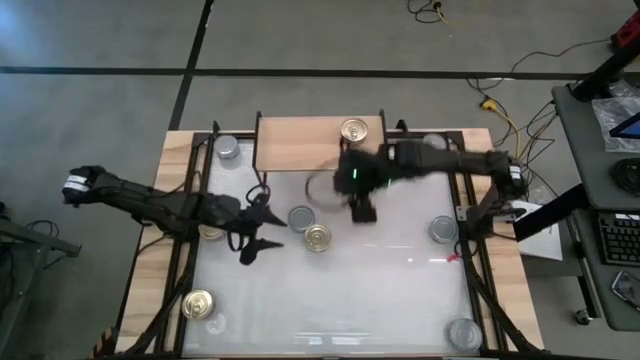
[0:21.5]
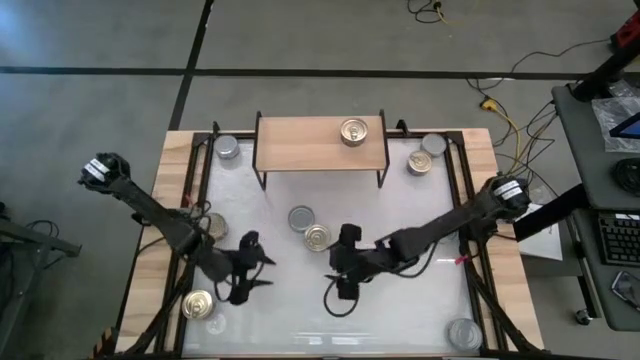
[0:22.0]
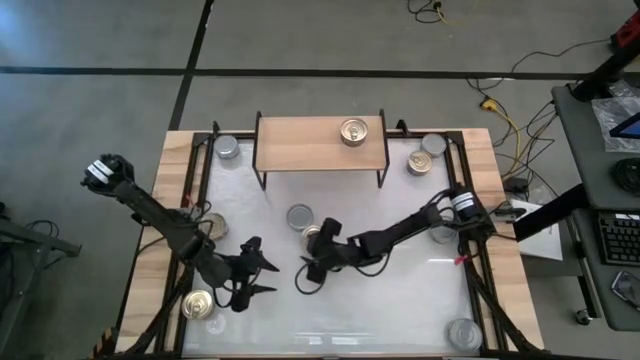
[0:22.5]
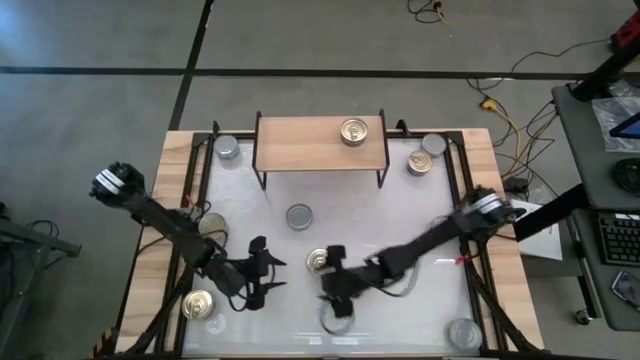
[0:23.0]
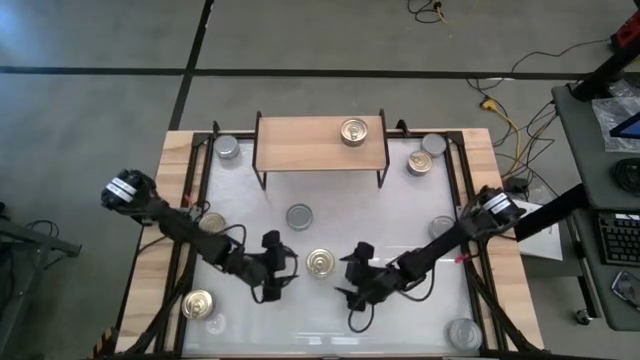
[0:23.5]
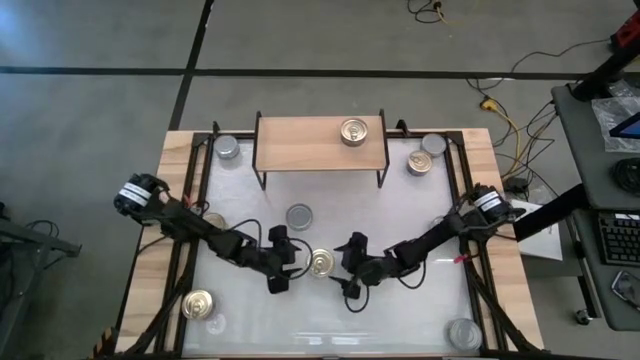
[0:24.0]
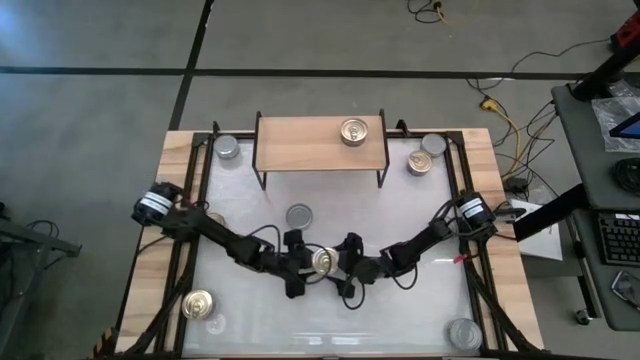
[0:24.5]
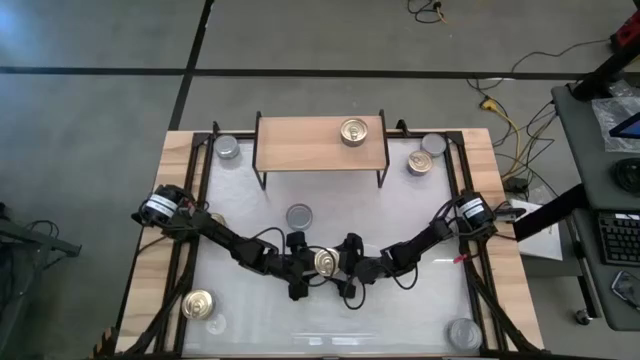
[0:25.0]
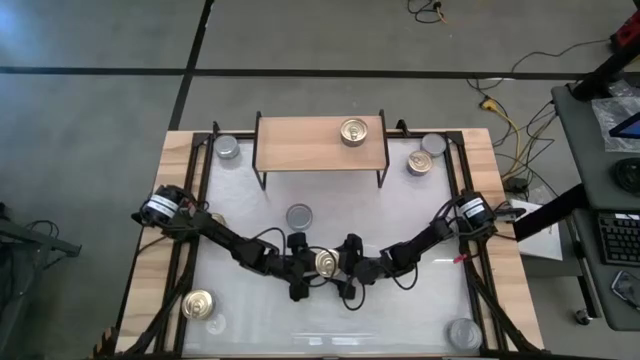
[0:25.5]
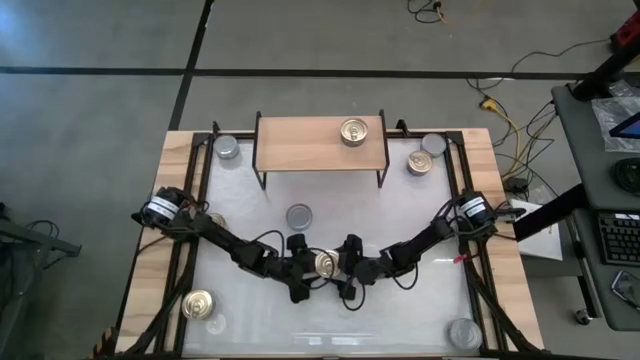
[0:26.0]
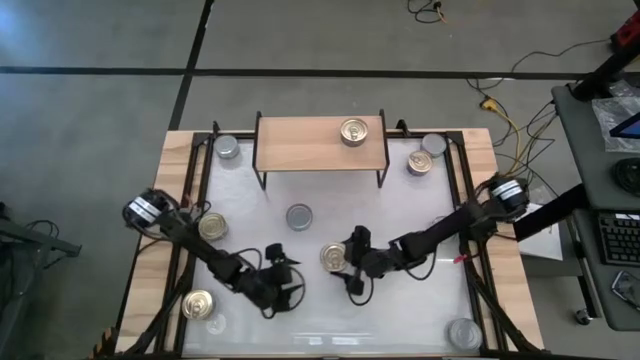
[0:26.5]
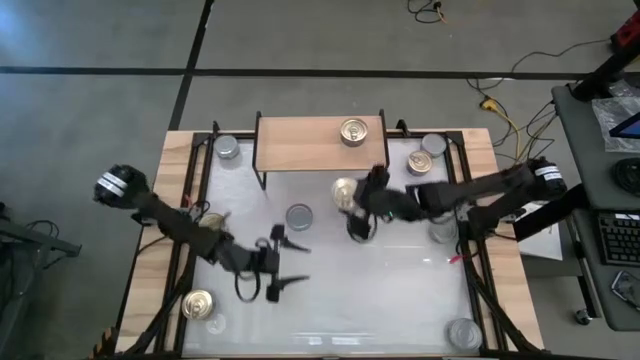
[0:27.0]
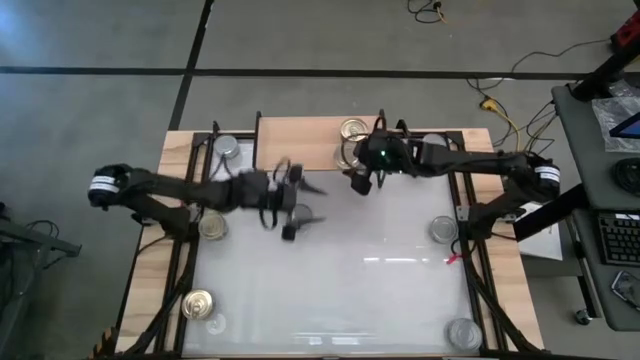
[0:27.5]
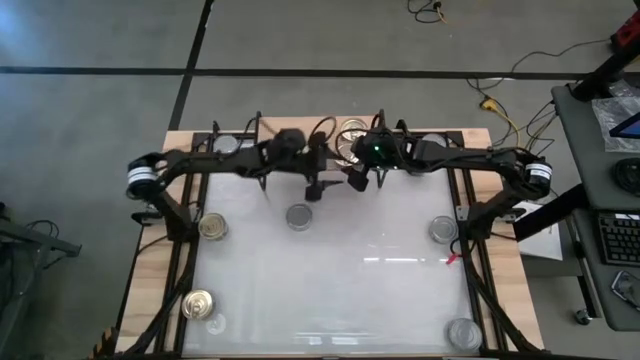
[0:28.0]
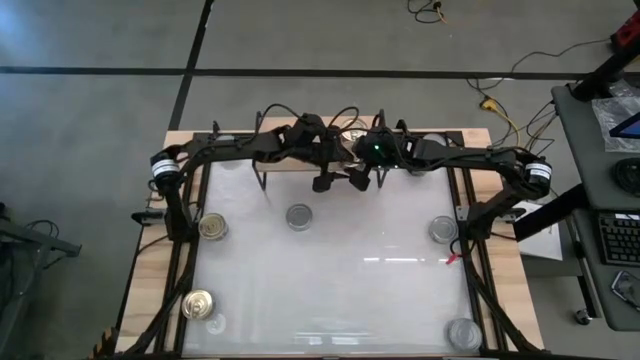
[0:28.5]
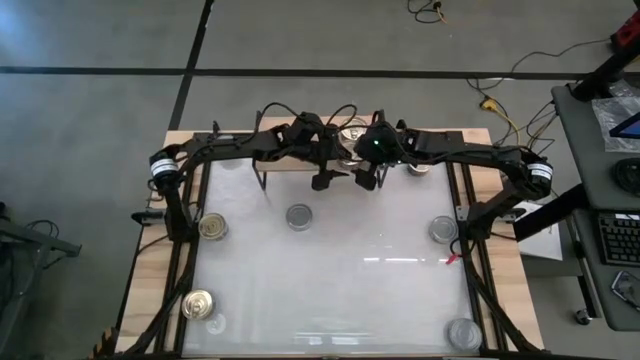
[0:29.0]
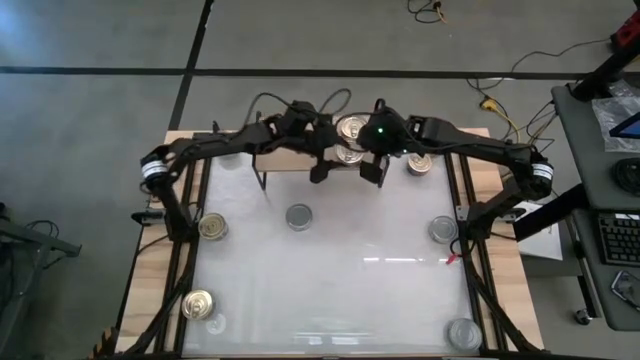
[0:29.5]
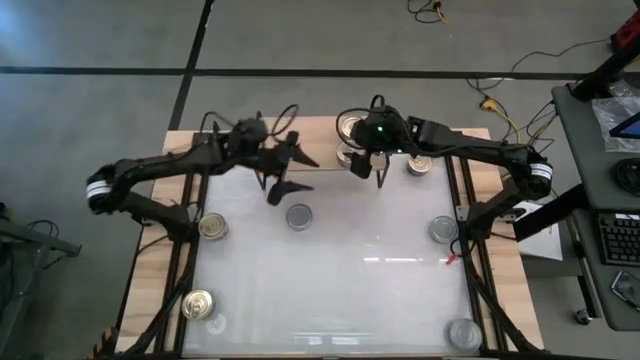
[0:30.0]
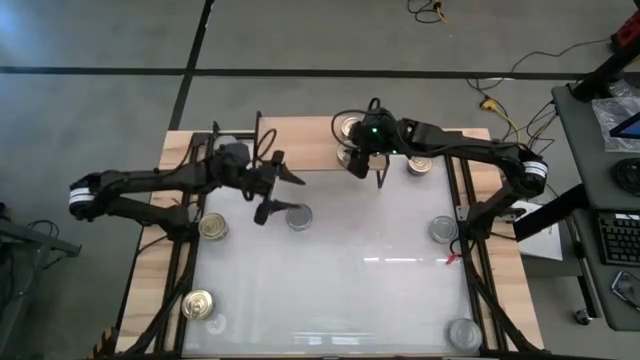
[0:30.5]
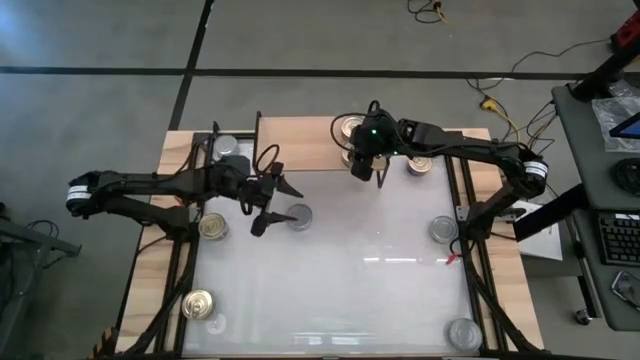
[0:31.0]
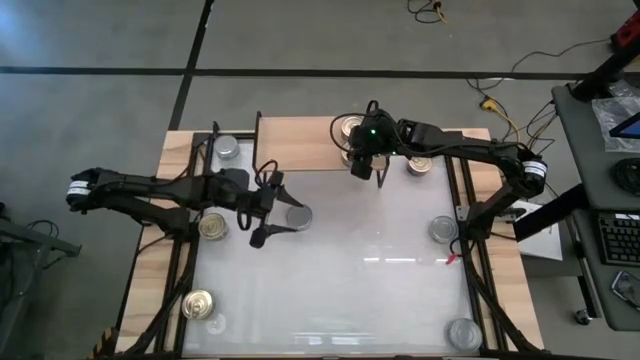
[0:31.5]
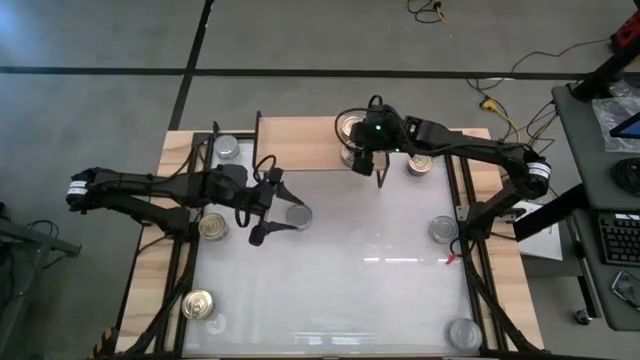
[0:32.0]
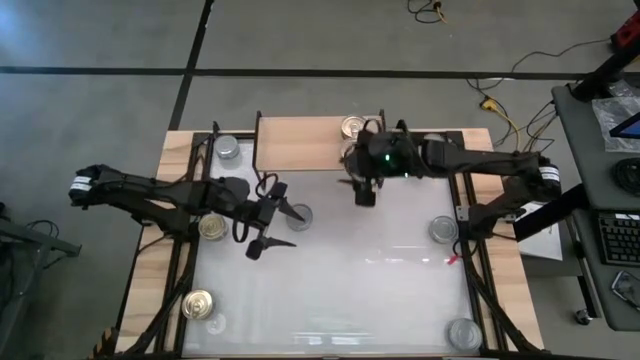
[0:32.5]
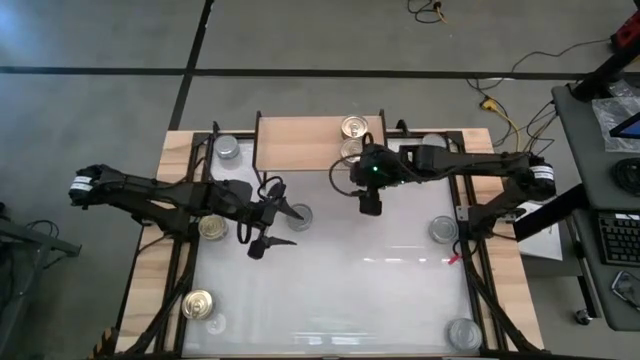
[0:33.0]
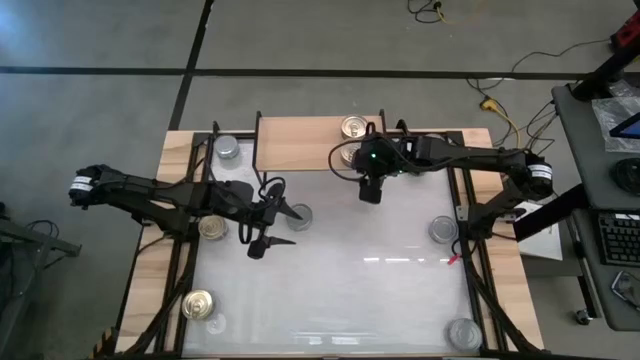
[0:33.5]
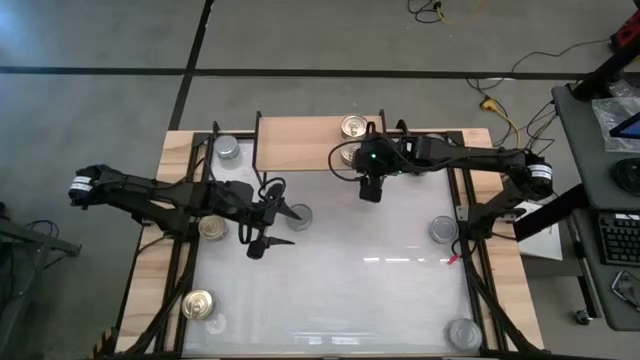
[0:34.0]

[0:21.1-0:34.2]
Task: Stack canned seafood by type on shelf
Put the blue-pink tuna can on the shelf aligned with the other blue-pink tuna can

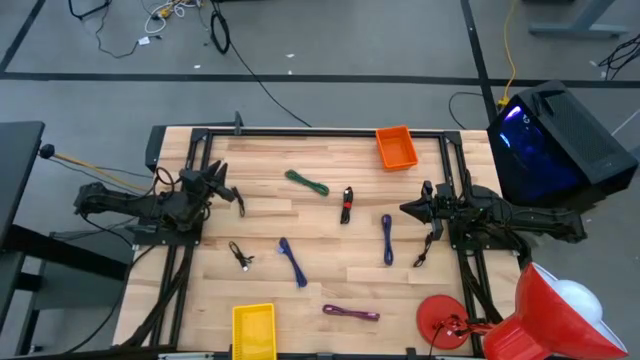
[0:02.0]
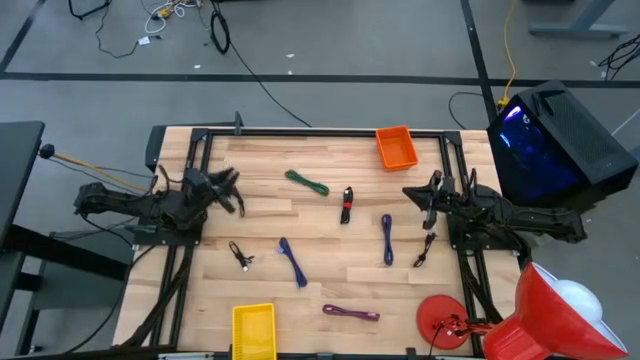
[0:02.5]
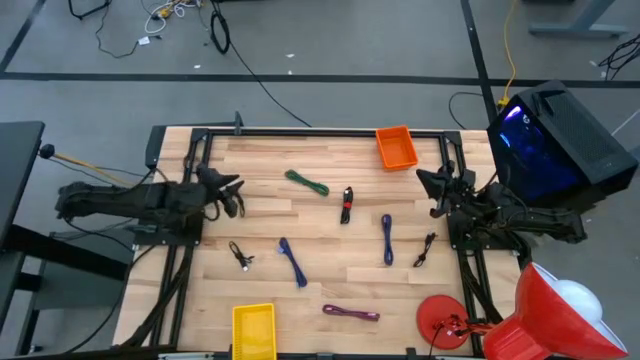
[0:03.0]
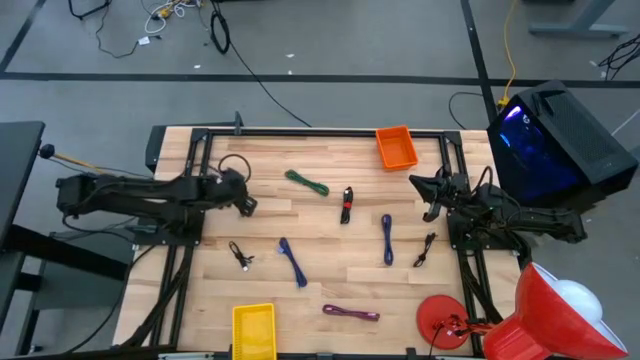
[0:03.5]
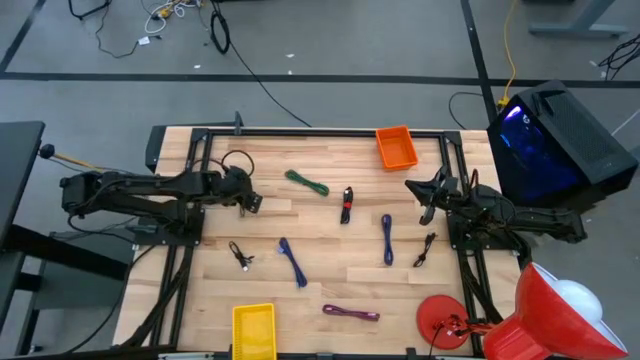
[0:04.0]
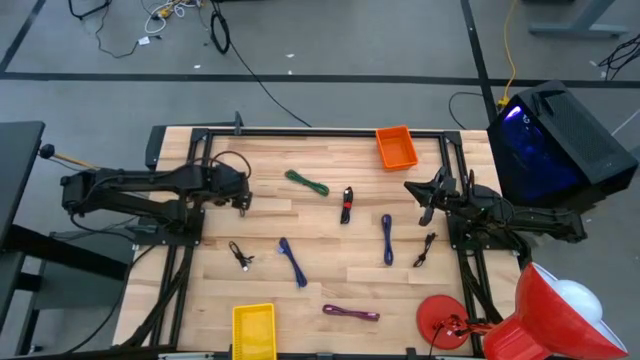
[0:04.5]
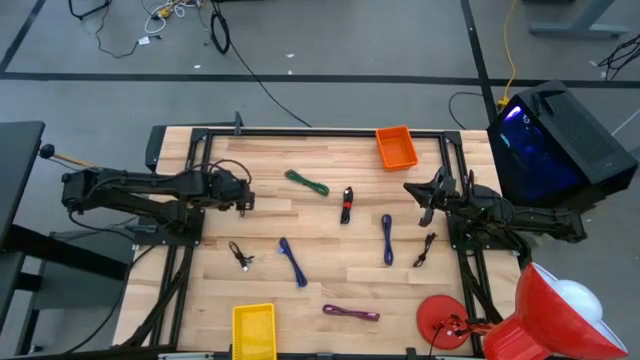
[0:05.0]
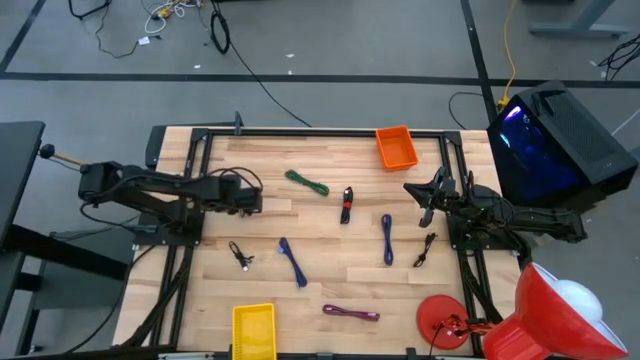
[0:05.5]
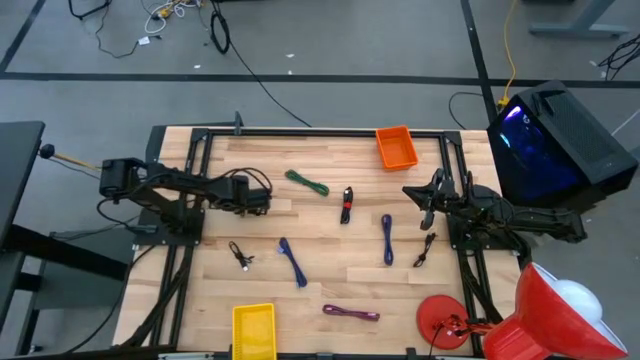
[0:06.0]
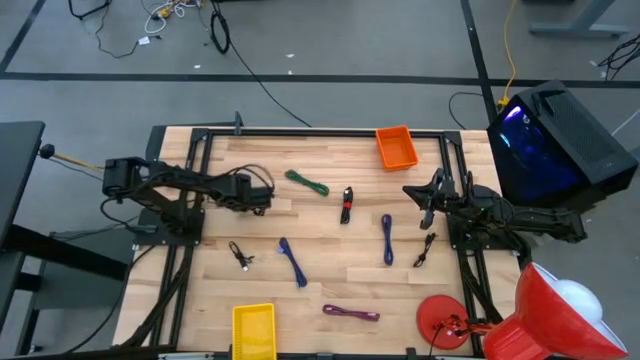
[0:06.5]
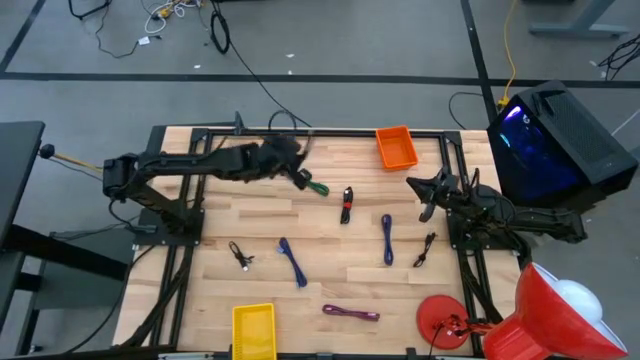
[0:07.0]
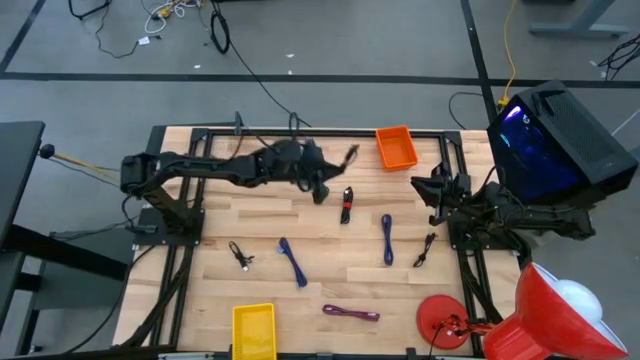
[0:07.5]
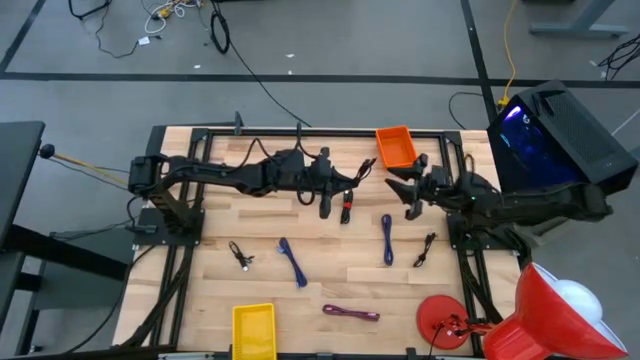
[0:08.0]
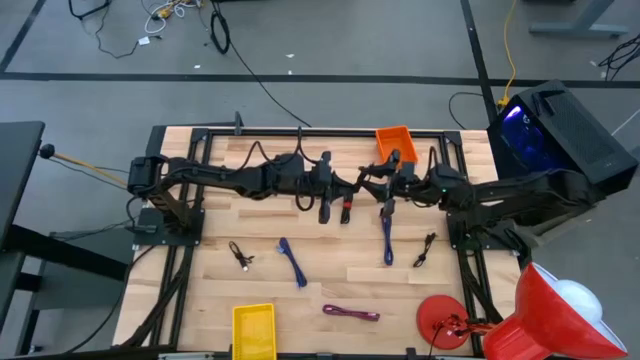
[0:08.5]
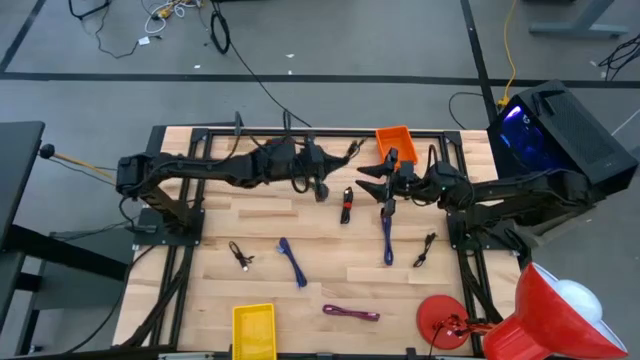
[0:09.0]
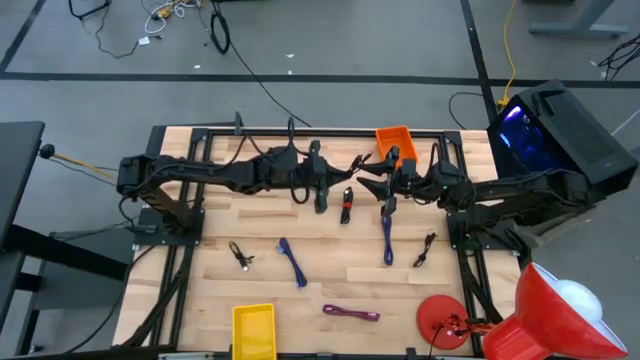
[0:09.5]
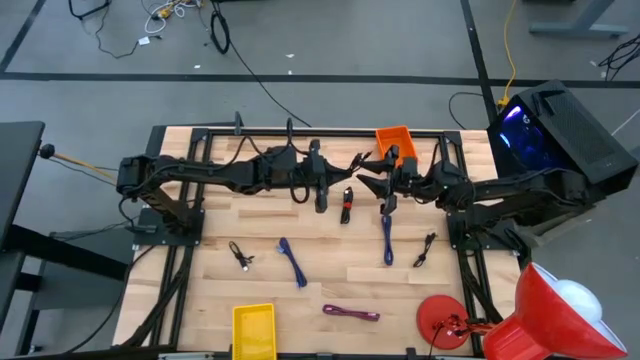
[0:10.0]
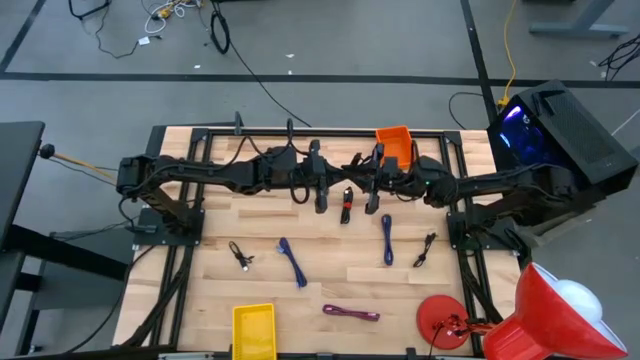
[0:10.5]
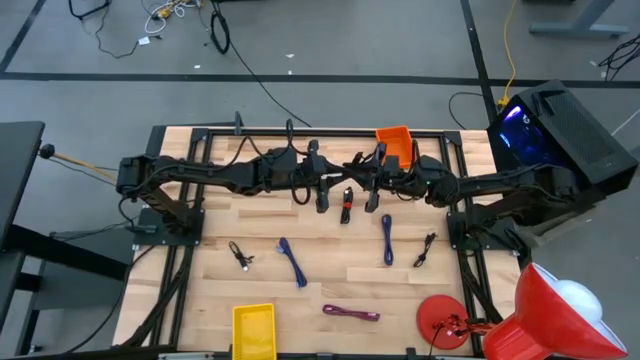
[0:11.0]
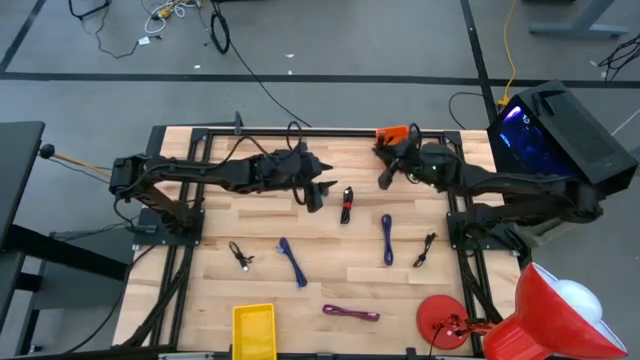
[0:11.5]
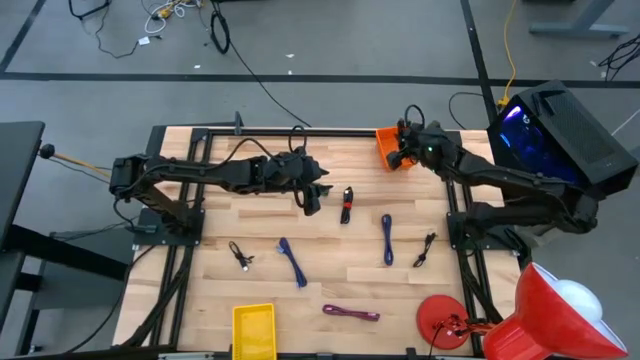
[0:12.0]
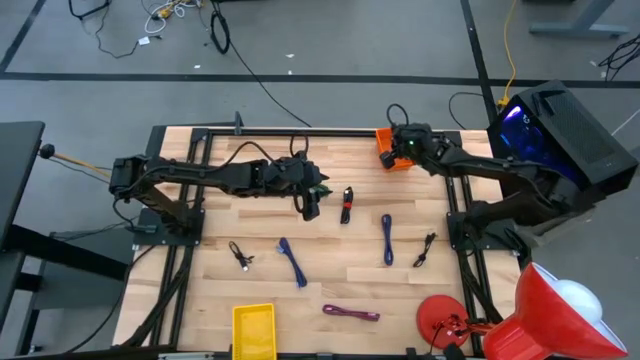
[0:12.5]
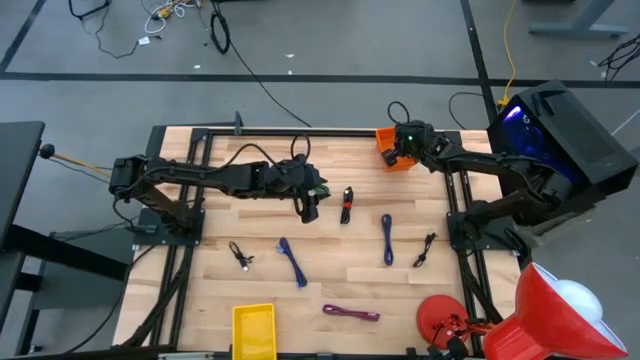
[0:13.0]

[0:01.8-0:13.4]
Task: Pick & Place USB Port
Put the black charger cable into the orange bin
